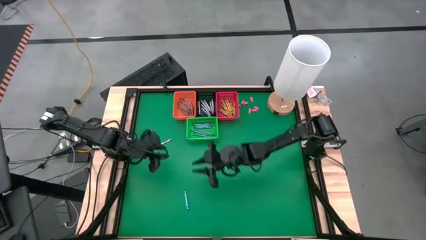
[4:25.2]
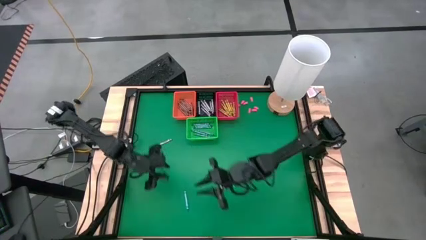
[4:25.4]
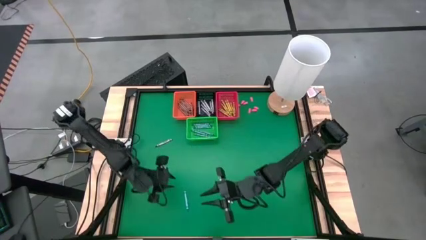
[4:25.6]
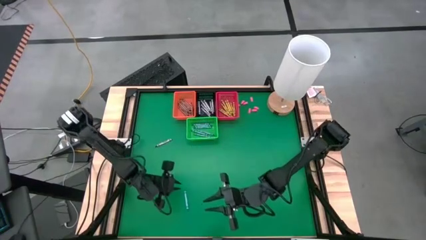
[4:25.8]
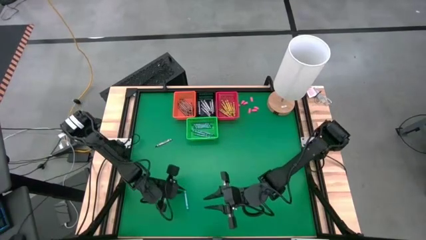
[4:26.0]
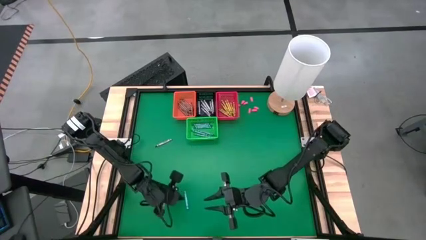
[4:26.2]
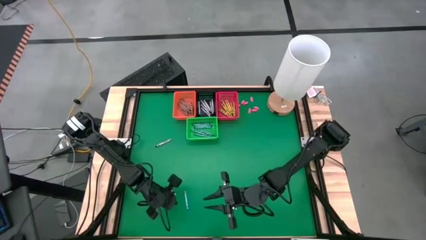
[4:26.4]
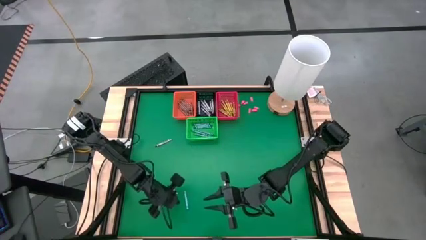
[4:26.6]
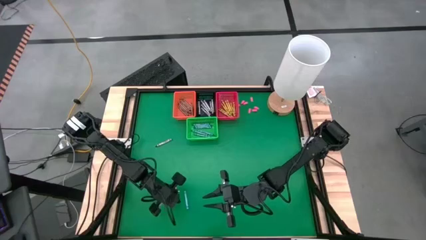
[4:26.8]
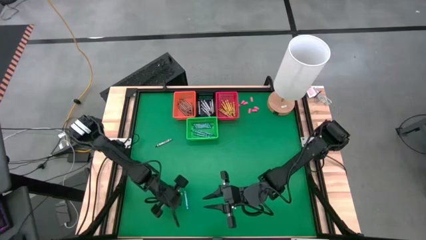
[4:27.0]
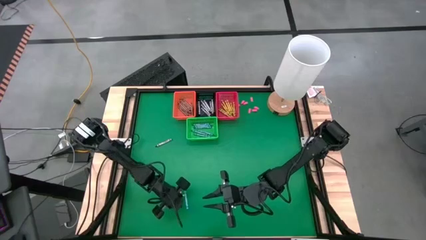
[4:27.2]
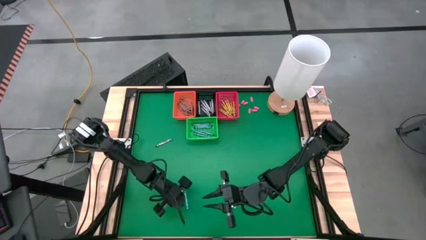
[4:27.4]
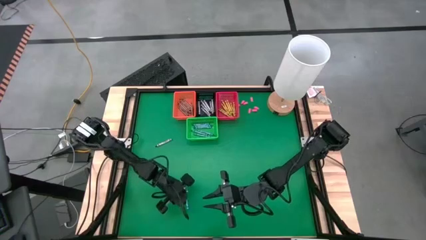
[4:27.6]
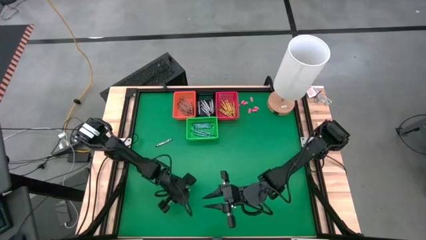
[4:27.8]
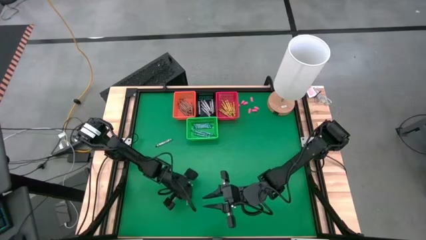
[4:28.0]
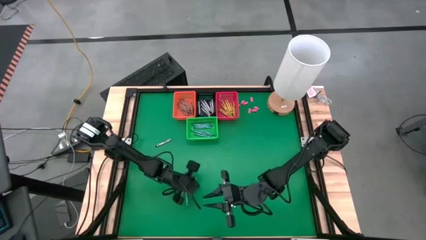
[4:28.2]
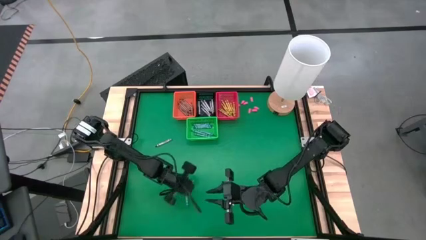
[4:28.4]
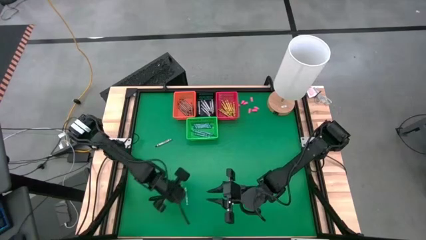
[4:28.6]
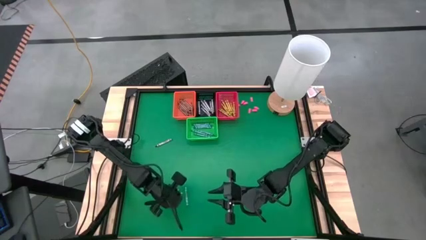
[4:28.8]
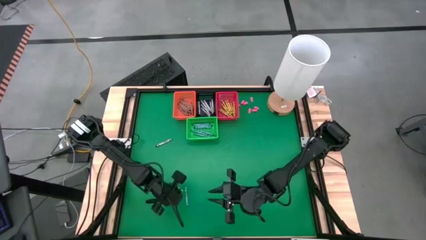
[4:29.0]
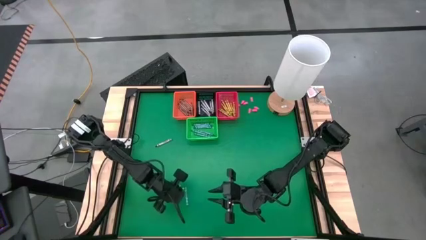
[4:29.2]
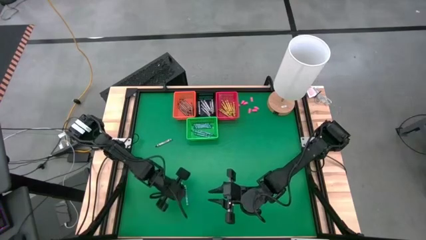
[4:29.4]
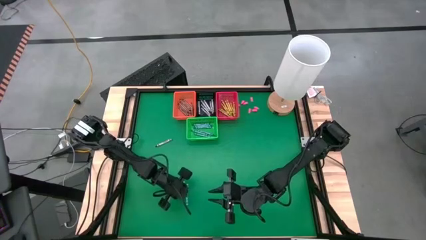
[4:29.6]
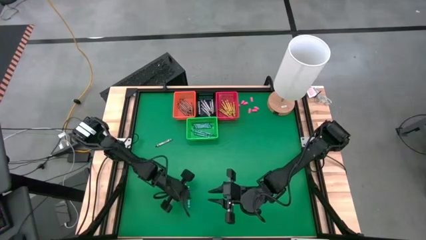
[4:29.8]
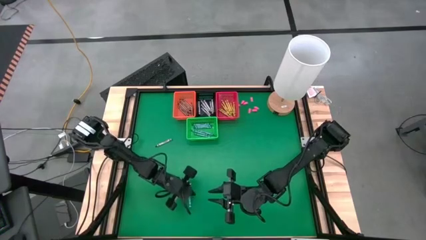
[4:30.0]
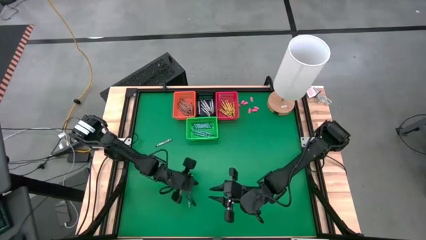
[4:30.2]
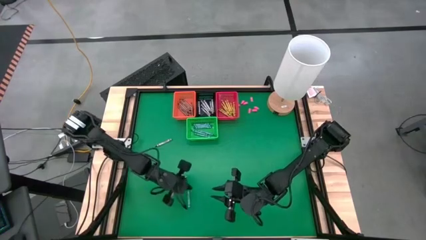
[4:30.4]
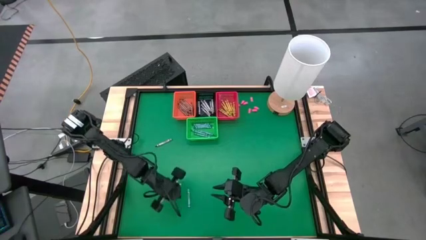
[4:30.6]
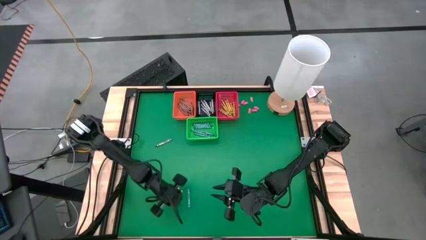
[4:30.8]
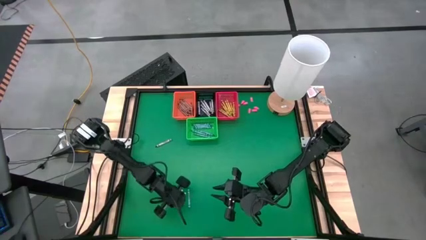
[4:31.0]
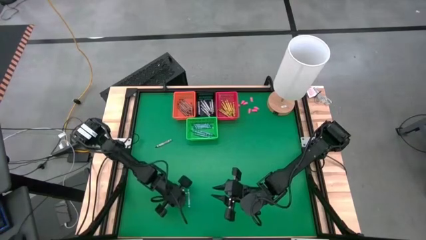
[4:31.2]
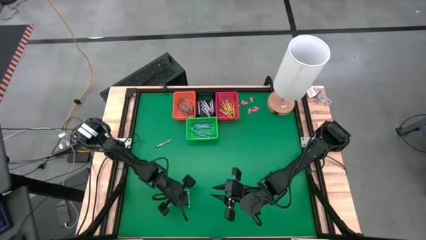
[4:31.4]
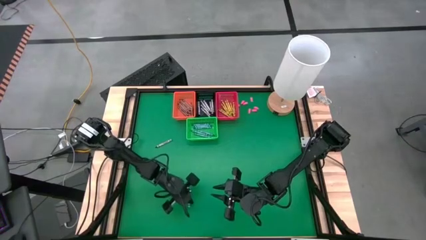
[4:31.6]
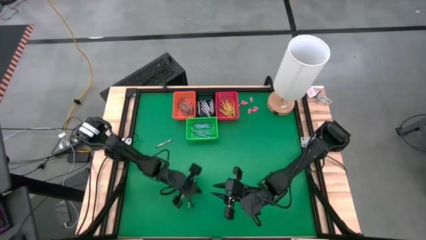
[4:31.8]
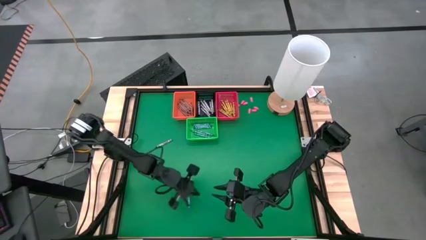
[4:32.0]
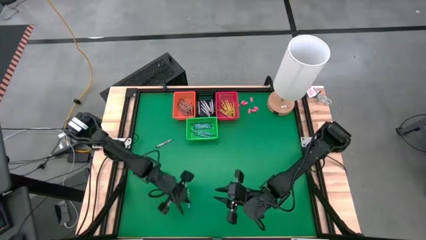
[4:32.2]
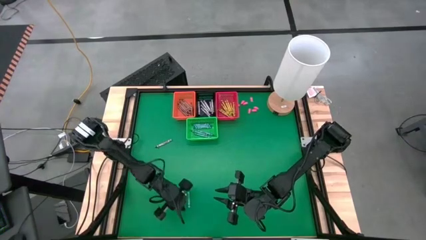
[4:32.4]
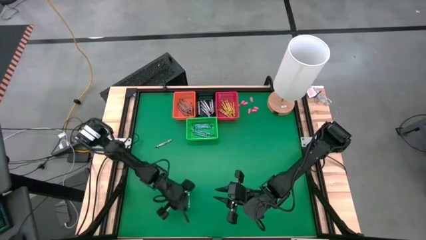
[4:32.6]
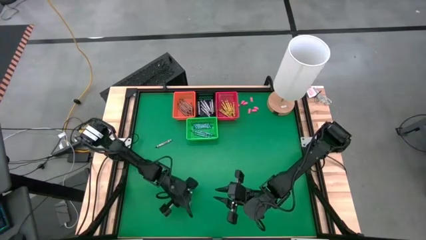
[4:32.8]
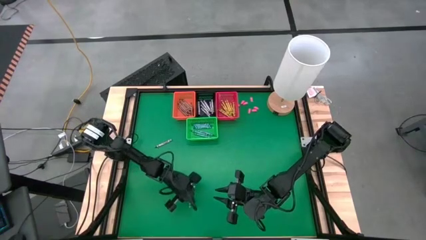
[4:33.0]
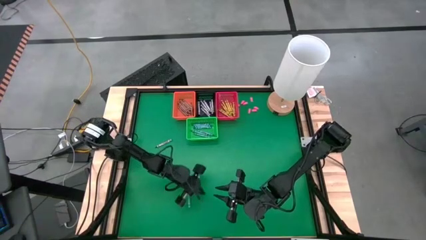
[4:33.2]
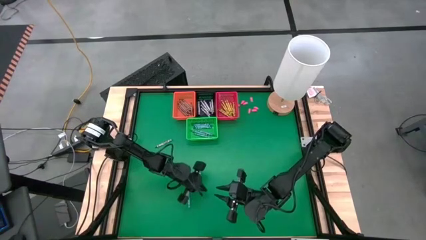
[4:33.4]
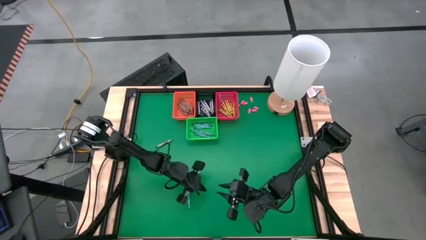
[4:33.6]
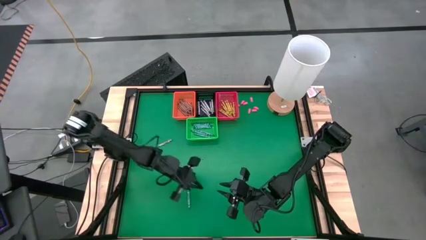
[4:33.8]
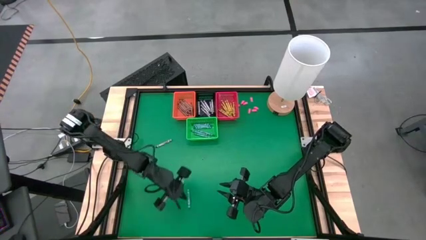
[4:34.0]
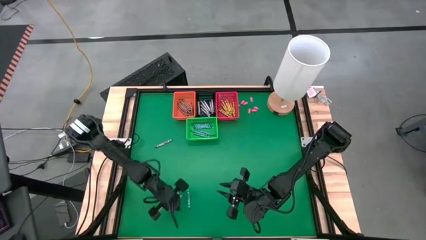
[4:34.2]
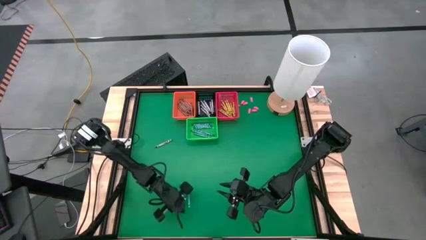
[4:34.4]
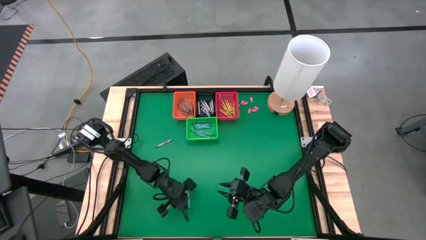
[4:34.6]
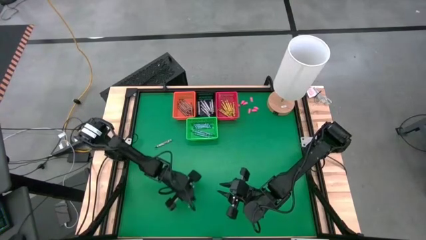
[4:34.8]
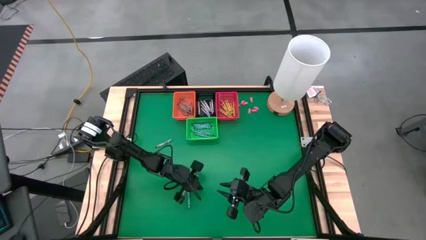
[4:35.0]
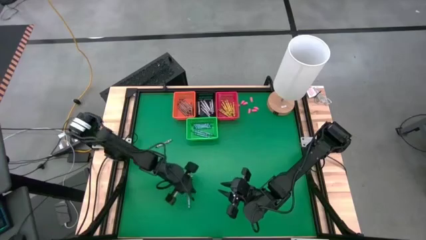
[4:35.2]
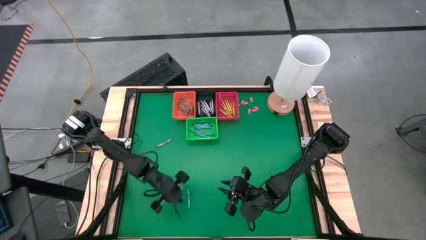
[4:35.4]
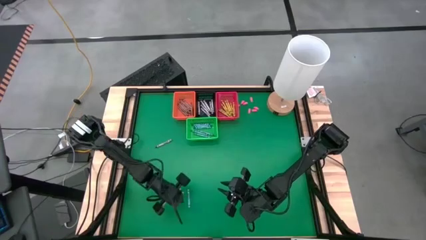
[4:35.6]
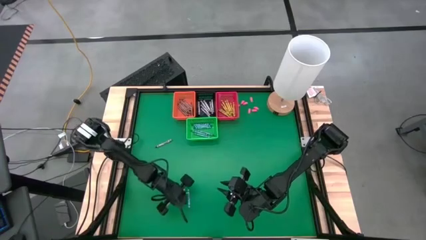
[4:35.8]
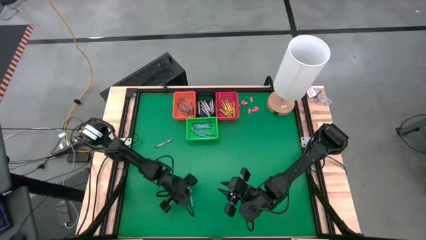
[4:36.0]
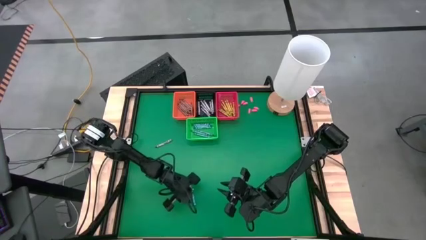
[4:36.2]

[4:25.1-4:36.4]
Task: Sort crayons
Put a blue crayon in the green basket

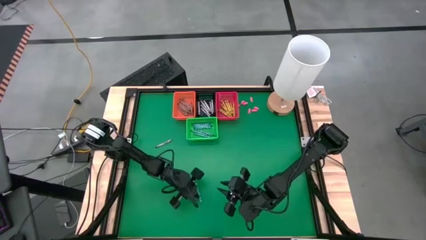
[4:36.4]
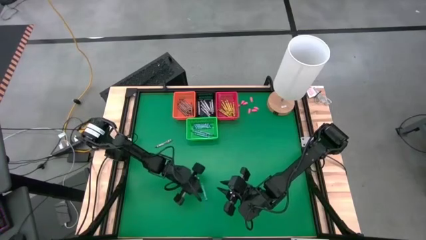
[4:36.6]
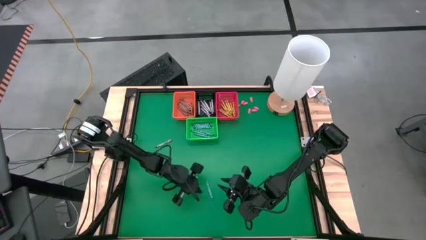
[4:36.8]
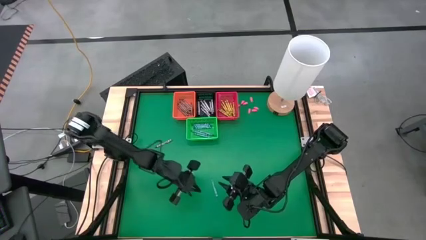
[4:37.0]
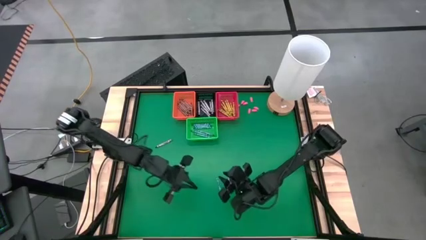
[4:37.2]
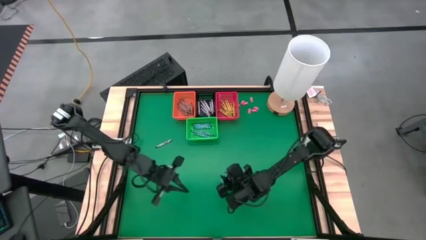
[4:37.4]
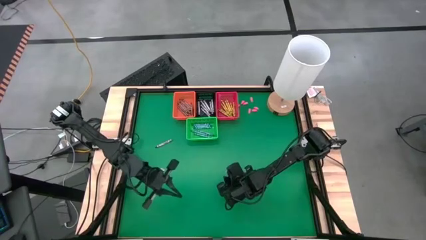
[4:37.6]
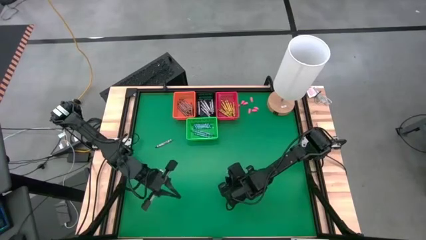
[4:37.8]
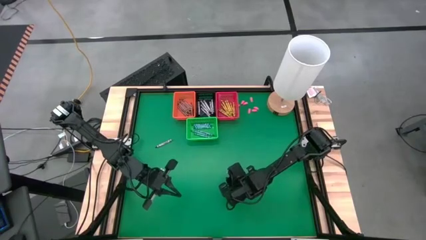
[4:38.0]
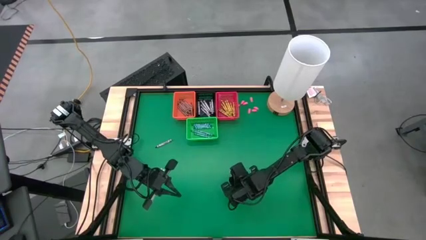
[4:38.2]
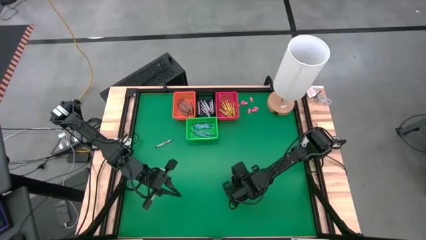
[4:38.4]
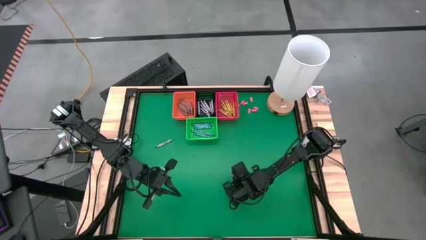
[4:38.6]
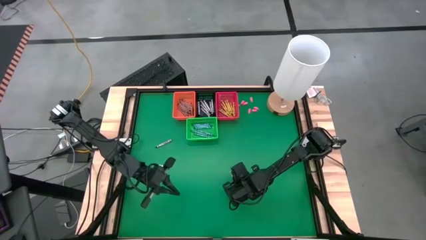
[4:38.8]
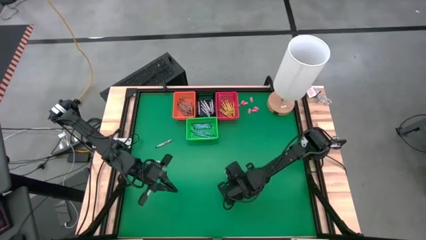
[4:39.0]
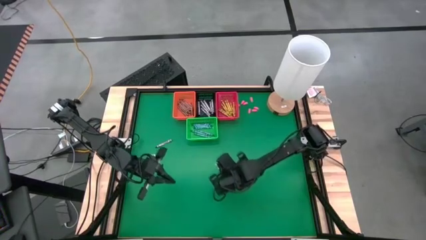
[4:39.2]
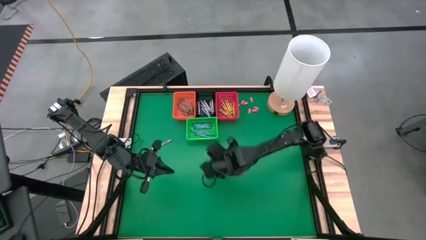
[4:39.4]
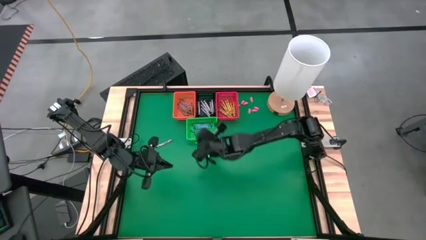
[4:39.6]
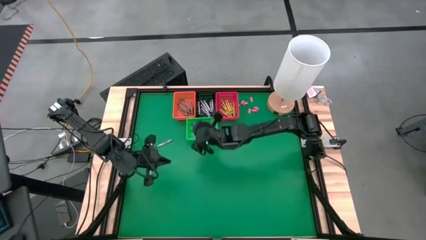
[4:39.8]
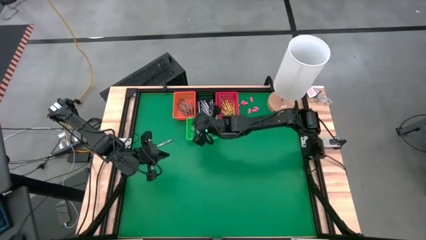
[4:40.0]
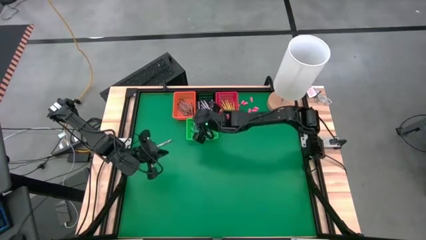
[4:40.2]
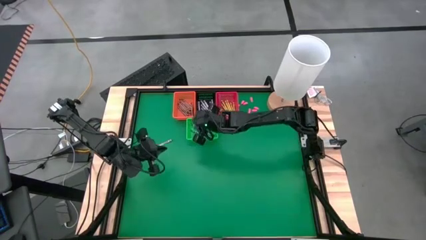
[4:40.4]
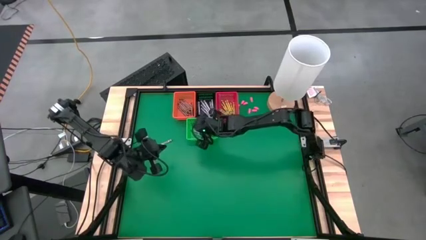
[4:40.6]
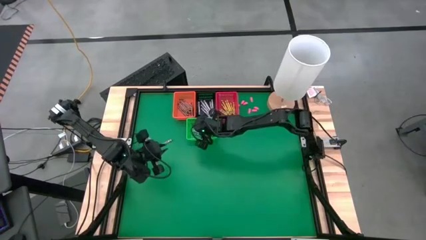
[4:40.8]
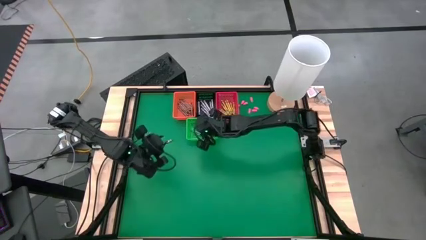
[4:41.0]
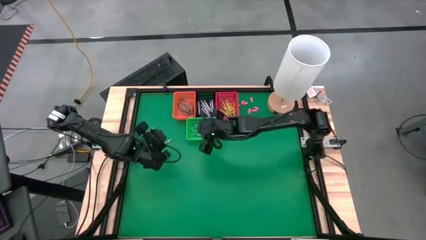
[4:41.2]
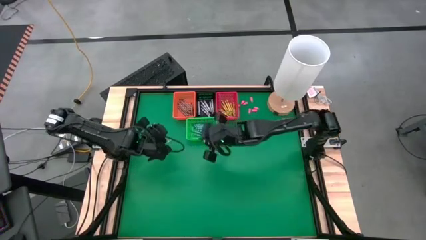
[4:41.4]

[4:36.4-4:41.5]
Put a blue crayon in the green basket
